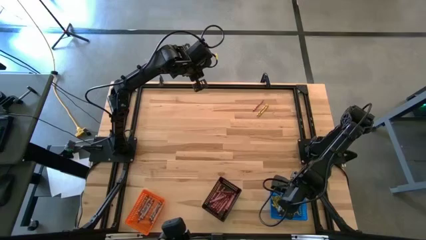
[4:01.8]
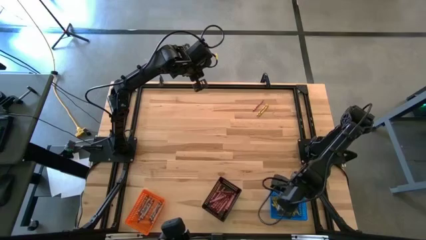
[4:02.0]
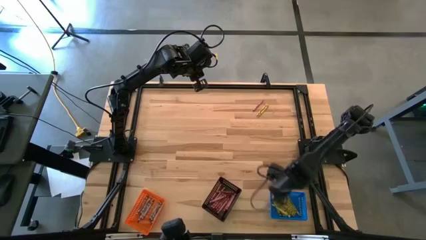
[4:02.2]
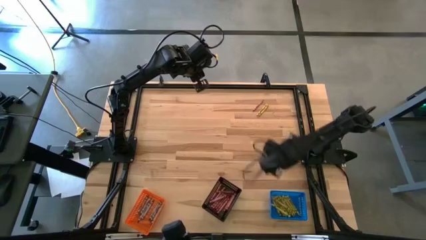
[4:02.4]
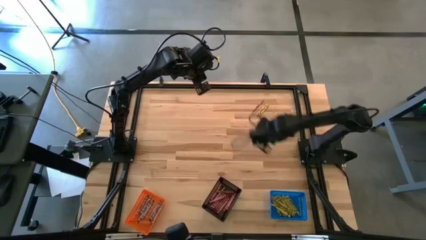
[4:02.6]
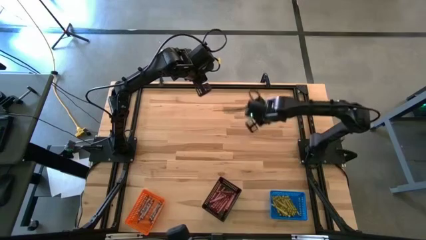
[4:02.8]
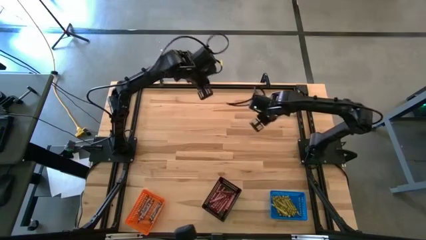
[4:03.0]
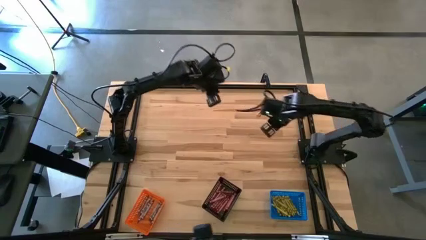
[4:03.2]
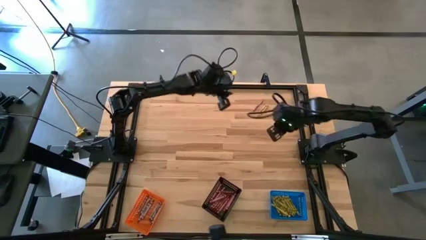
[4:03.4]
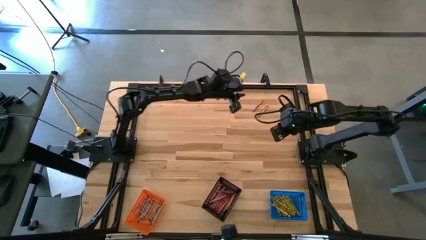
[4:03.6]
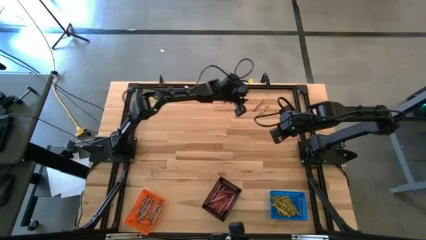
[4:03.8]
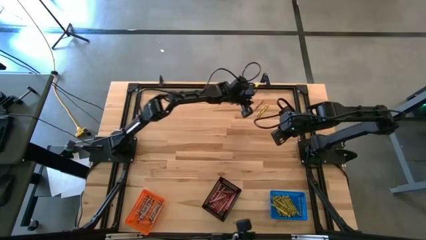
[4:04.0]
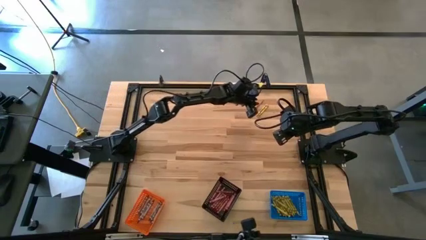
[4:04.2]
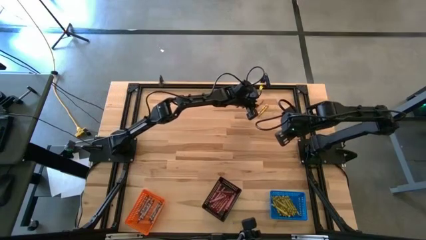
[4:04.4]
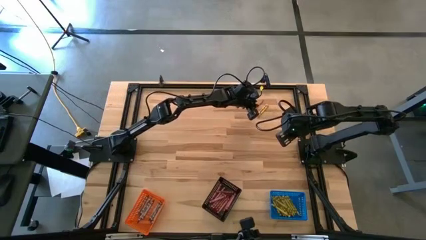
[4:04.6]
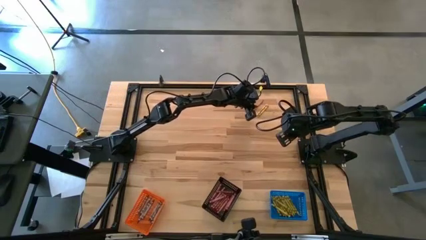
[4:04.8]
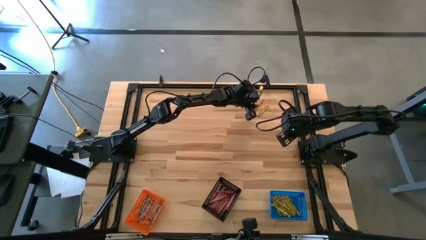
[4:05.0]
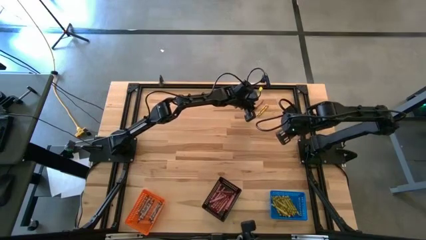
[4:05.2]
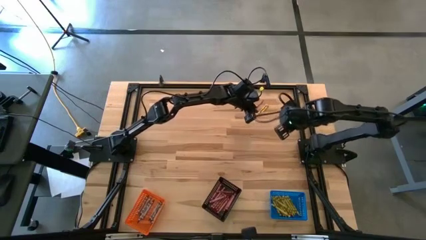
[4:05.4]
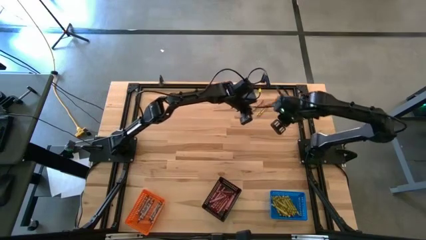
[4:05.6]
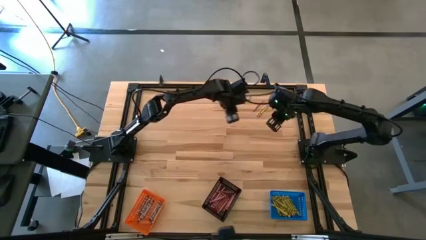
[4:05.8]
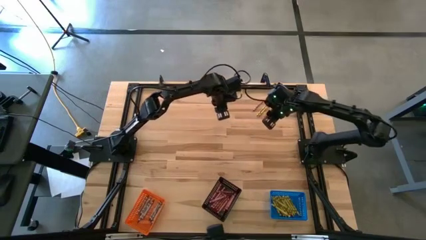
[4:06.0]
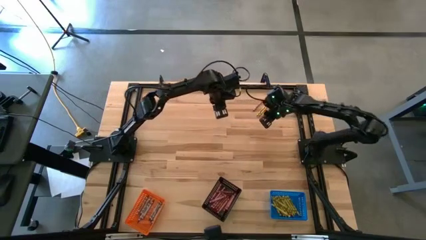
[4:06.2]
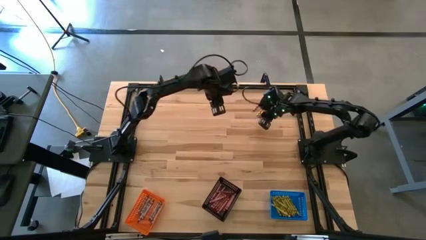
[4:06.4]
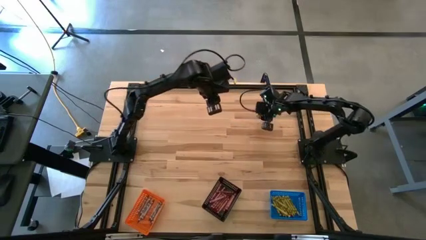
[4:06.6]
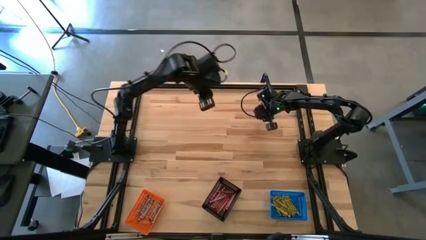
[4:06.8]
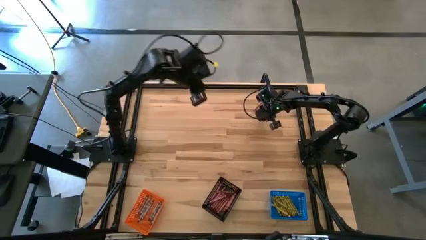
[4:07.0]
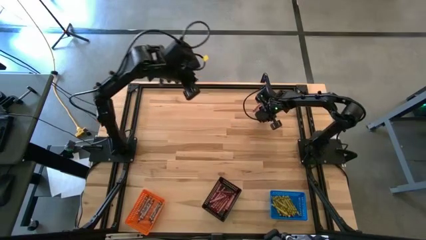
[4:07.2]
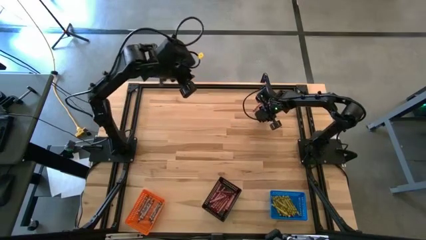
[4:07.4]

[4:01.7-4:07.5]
Task: Sort crayons
Put the yellow crayon into the blue bin

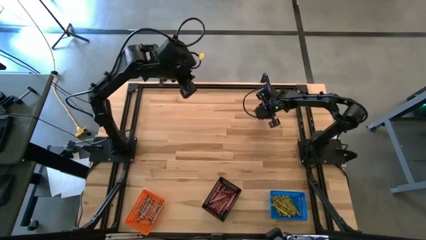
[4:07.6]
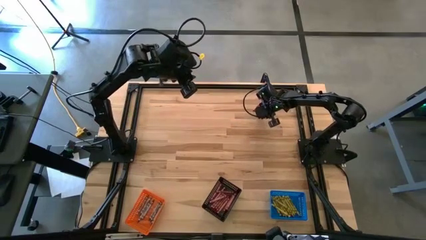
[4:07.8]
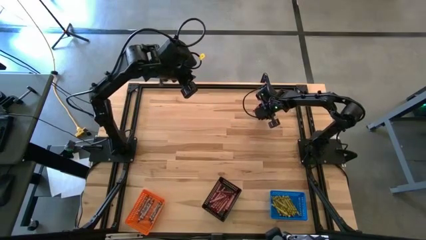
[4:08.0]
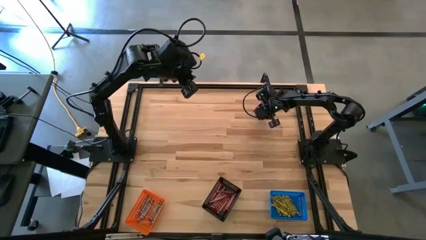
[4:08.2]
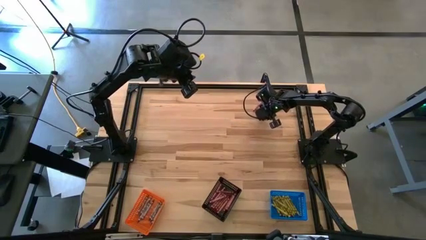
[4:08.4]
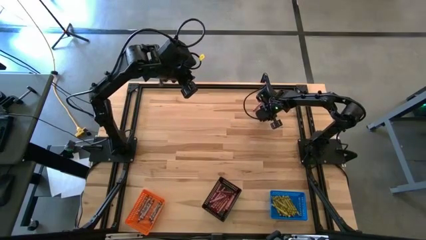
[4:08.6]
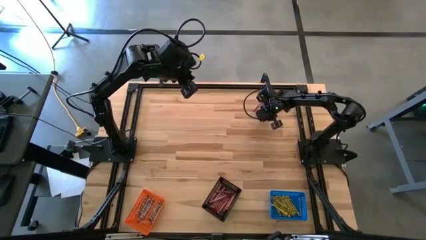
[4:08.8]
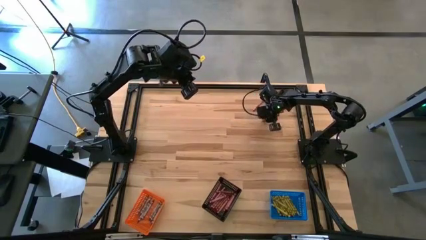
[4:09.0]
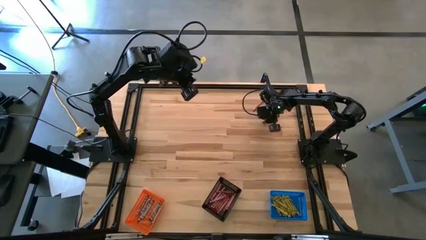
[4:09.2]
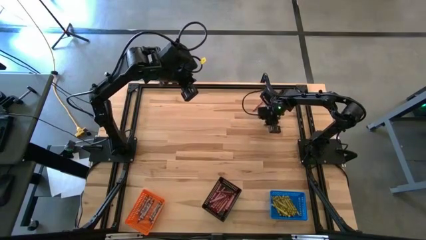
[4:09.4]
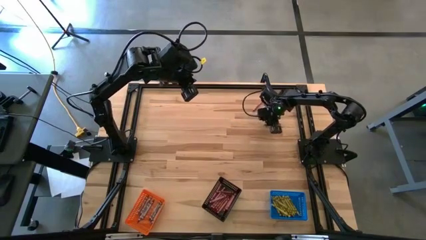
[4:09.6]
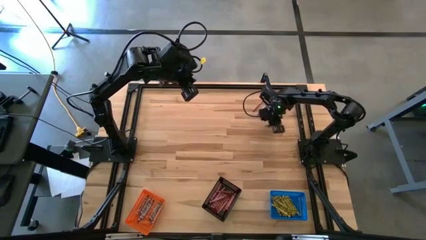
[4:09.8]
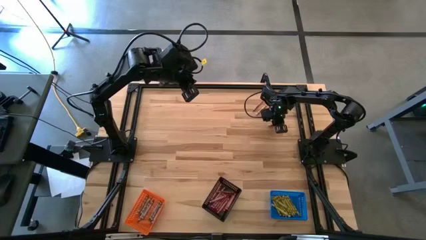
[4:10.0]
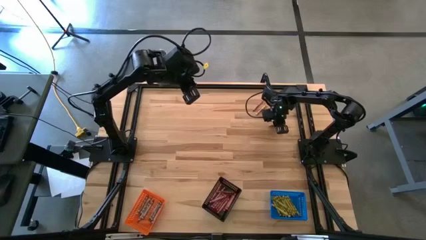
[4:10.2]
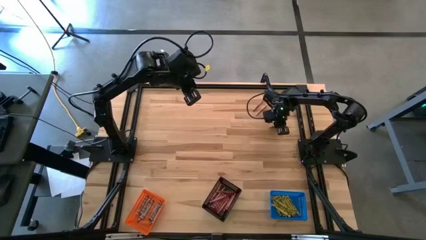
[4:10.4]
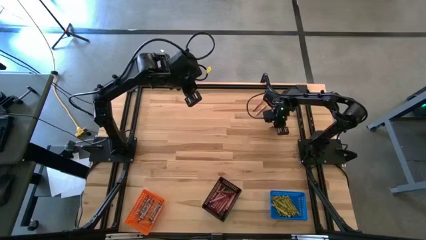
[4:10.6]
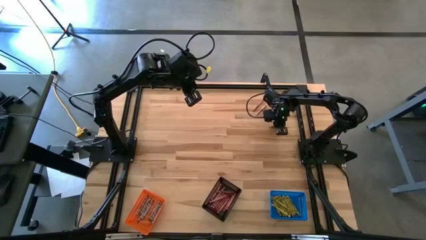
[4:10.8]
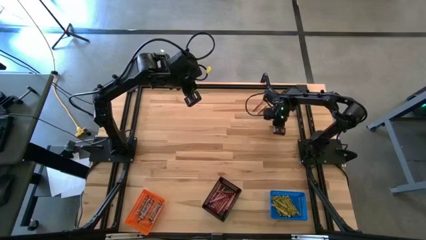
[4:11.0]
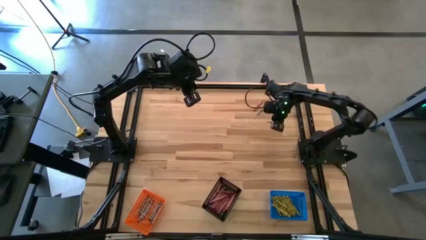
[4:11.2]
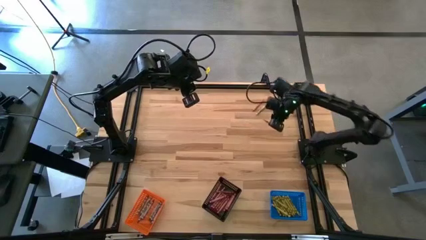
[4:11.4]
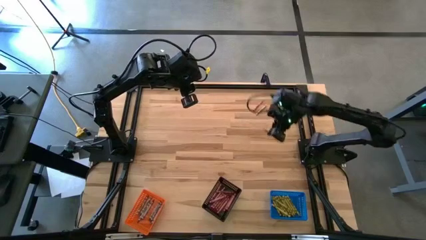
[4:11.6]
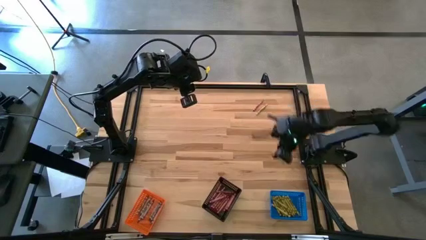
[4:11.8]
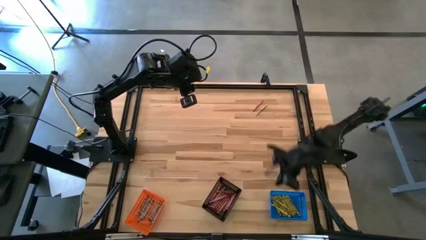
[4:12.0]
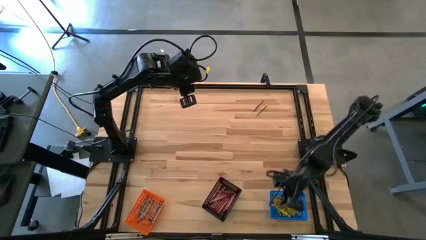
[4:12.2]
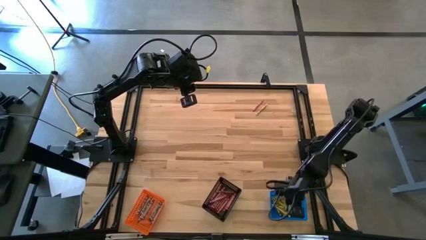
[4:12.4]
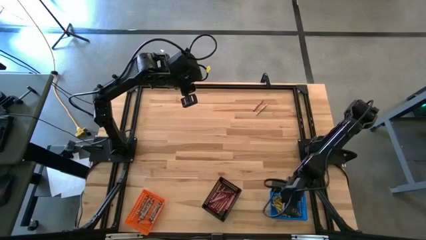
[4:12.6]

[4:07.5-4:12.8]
Put the yellow crayon into the blue bin

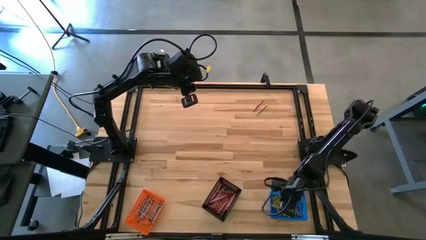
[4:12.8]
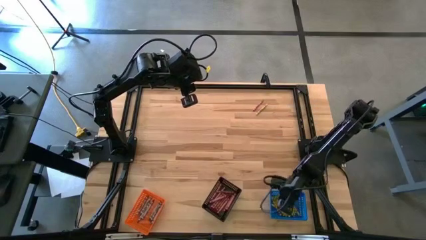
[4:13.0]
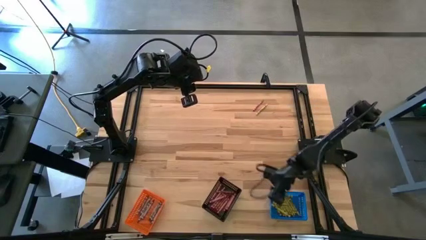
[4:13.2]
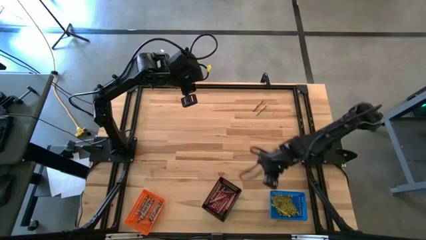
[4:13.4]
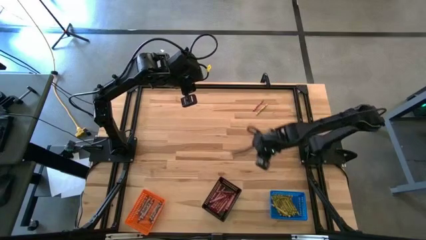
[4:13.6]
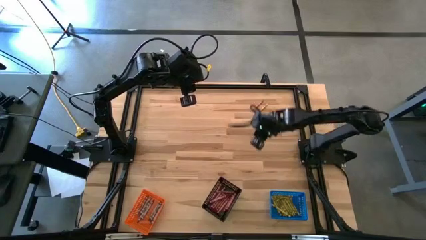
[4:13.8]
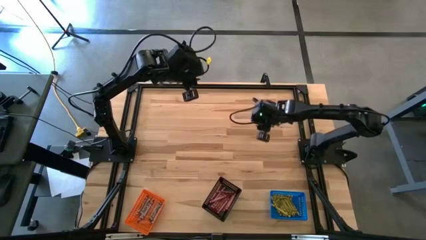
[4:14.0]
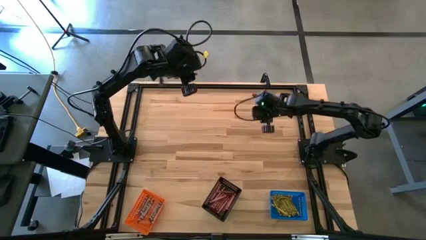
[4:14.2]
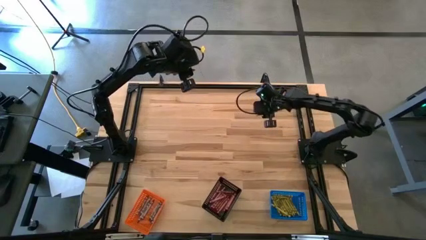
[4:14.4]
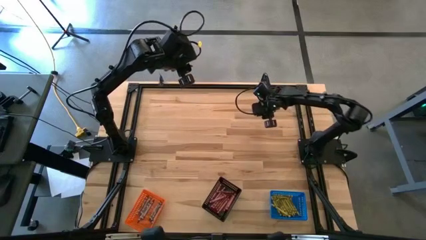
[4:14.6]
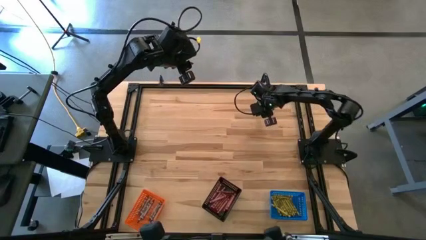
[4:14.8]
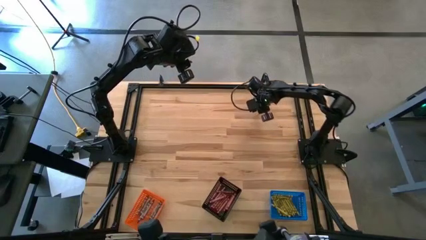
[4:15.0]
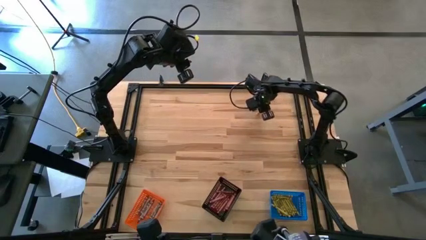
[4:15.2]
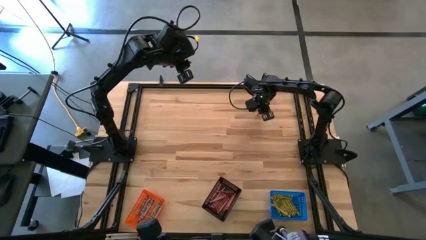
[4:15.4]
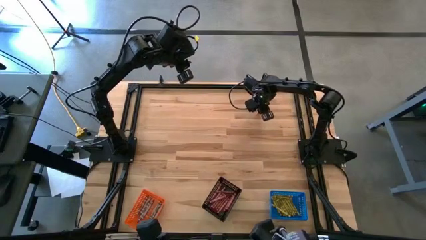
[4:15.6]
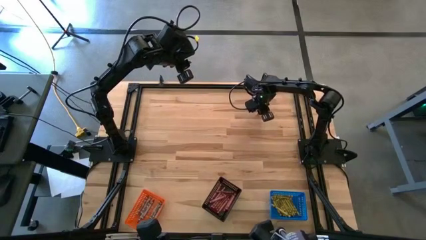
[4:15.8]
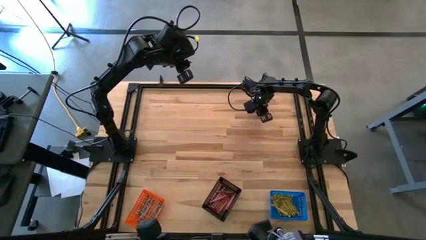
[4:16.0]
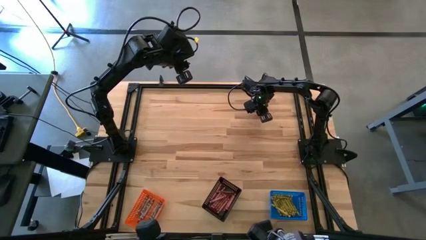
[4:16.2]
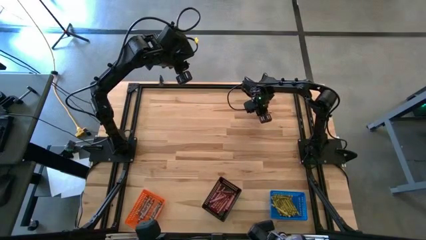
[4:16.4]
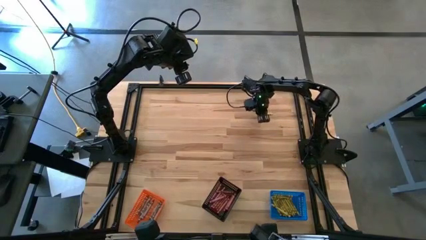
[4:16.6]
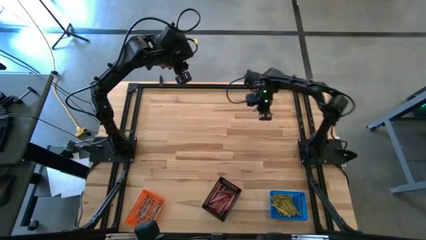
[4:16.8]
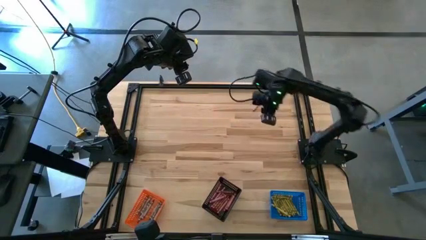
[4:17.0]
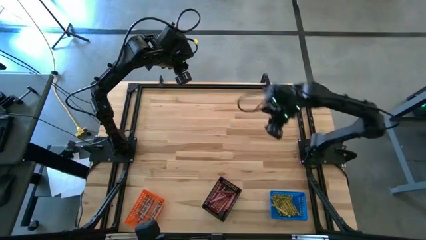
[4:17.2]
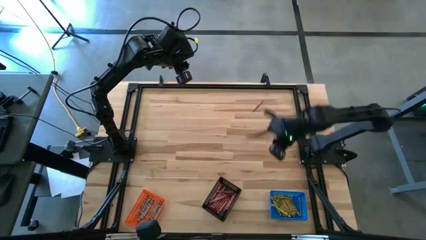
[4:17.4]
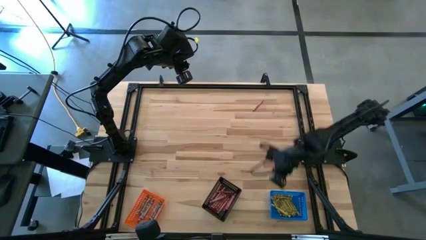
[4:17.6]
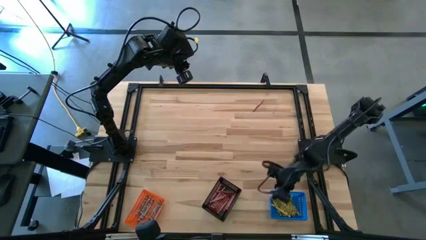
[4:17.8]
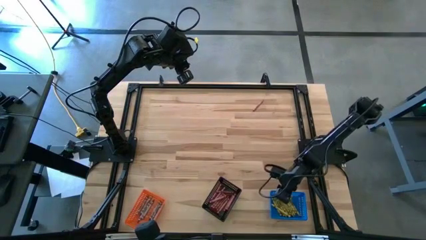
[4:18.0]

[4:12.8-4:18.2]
Put the yellow crayon into the blue bin
